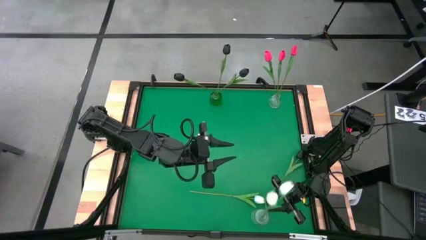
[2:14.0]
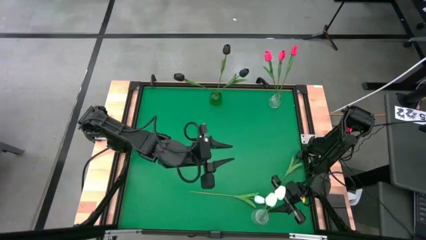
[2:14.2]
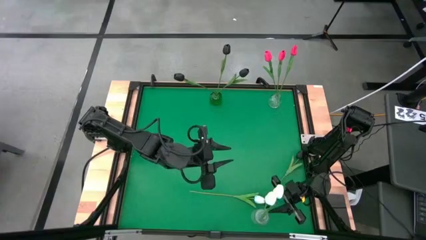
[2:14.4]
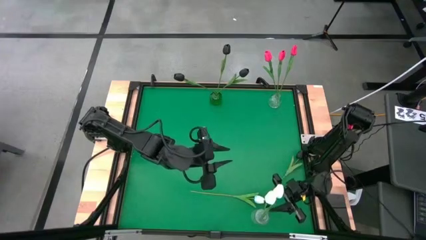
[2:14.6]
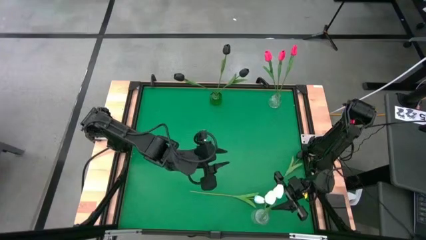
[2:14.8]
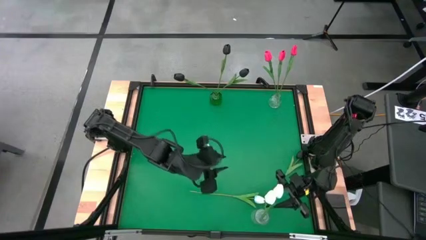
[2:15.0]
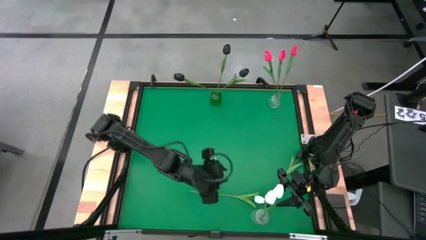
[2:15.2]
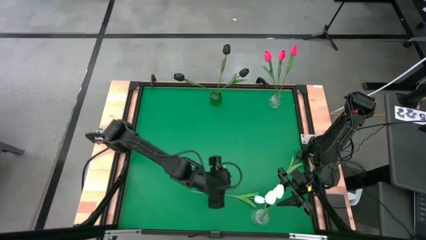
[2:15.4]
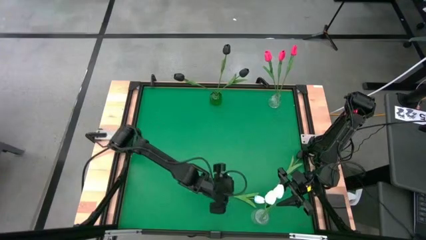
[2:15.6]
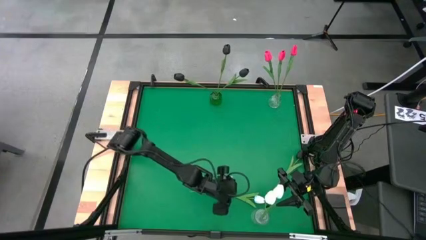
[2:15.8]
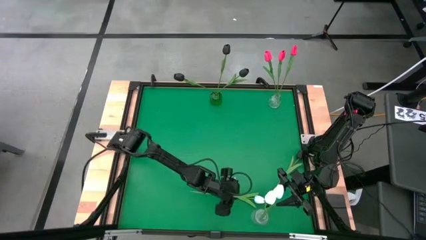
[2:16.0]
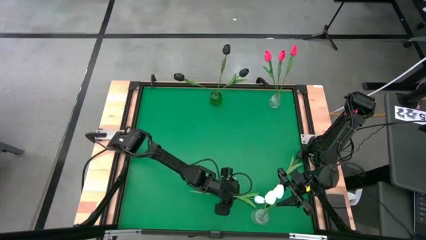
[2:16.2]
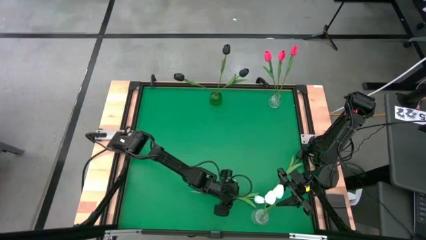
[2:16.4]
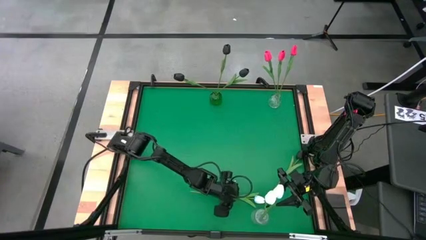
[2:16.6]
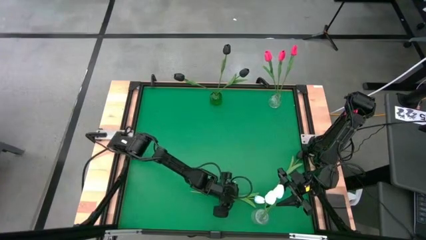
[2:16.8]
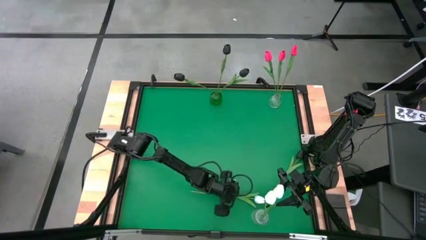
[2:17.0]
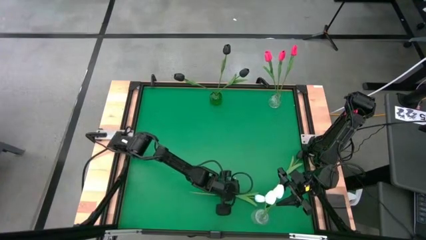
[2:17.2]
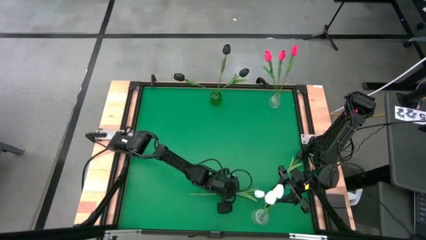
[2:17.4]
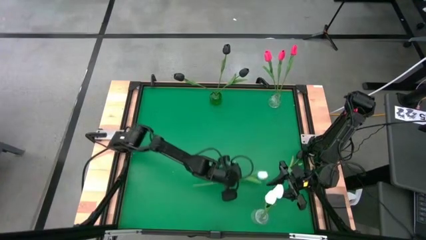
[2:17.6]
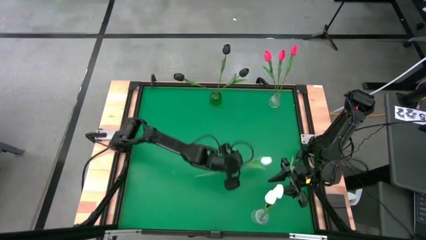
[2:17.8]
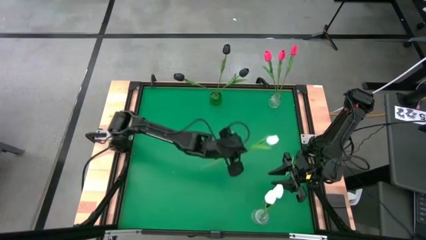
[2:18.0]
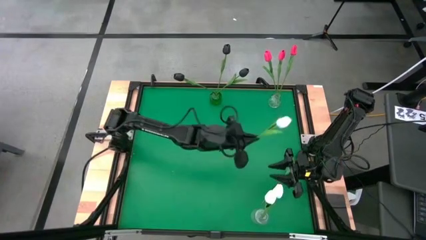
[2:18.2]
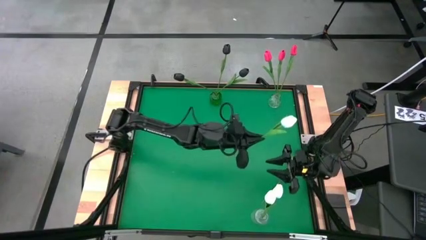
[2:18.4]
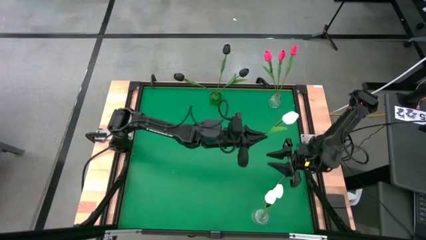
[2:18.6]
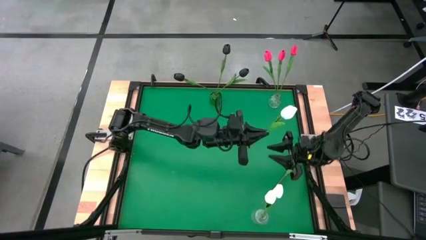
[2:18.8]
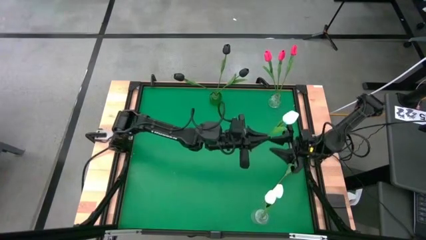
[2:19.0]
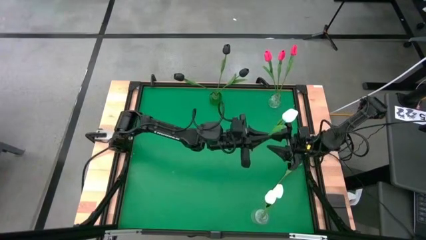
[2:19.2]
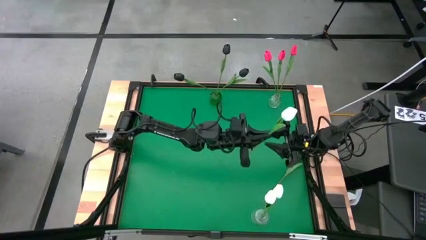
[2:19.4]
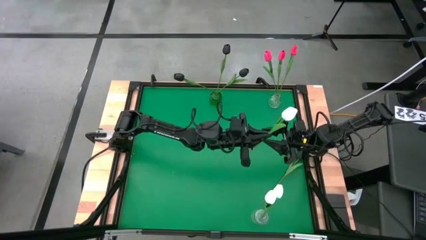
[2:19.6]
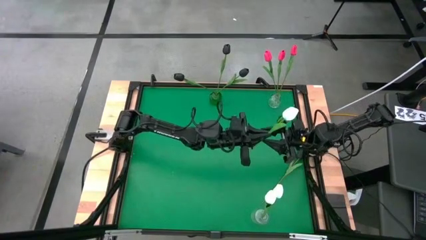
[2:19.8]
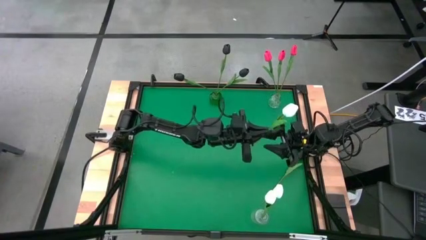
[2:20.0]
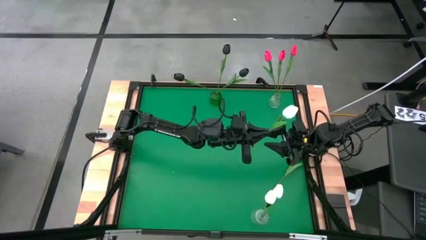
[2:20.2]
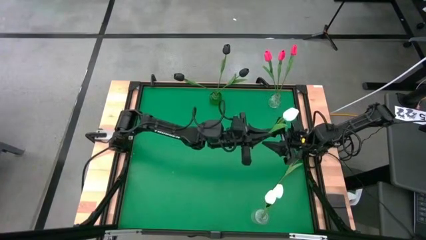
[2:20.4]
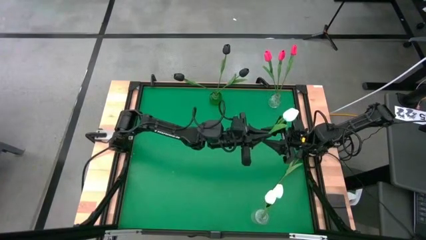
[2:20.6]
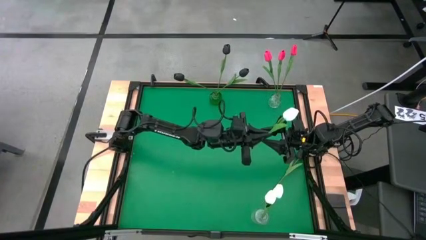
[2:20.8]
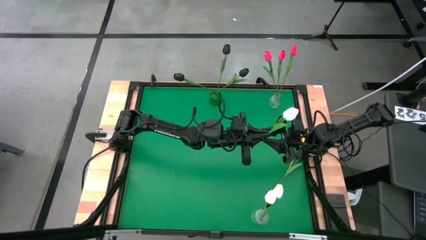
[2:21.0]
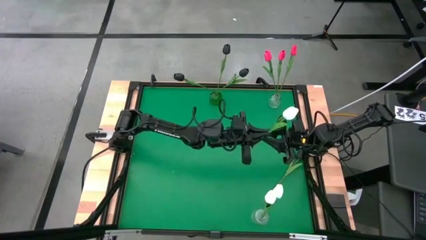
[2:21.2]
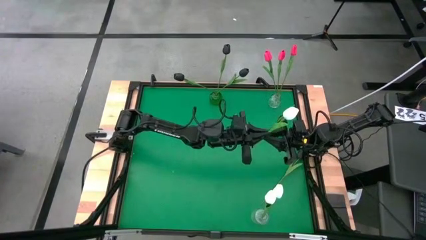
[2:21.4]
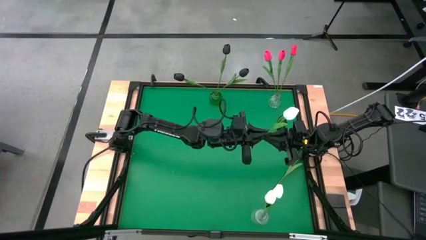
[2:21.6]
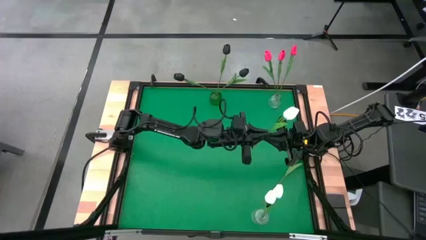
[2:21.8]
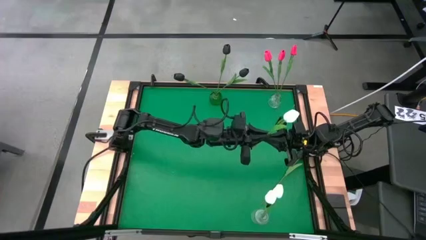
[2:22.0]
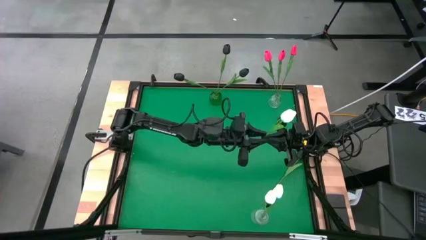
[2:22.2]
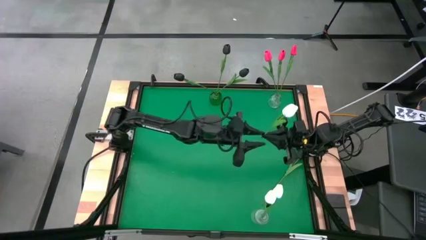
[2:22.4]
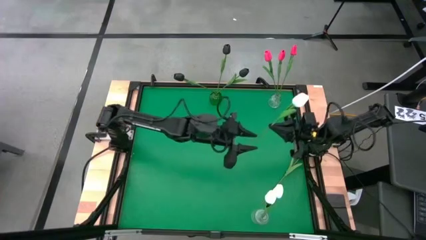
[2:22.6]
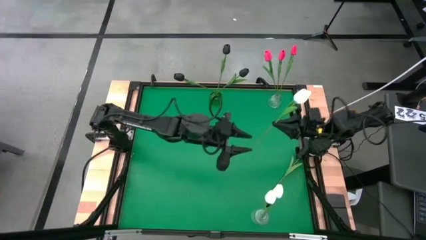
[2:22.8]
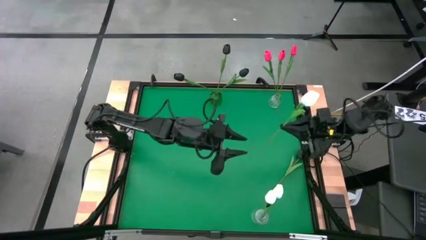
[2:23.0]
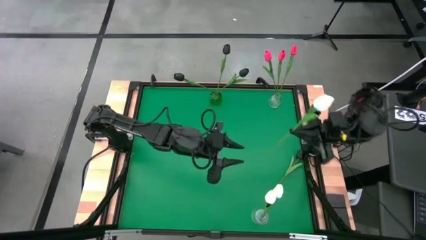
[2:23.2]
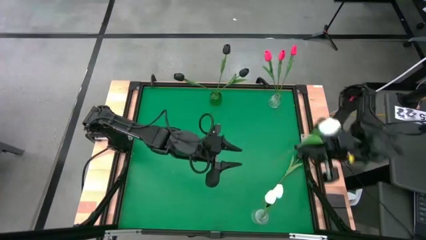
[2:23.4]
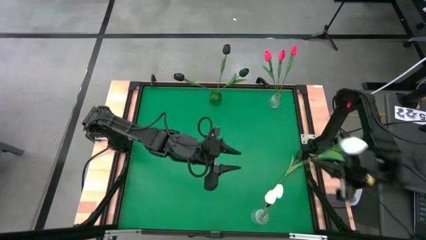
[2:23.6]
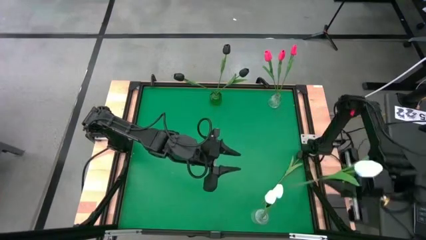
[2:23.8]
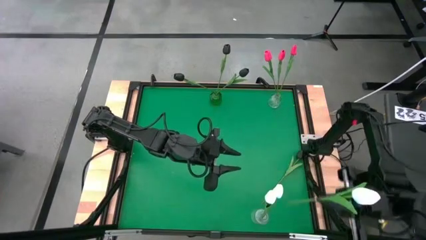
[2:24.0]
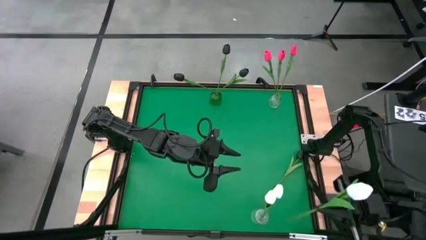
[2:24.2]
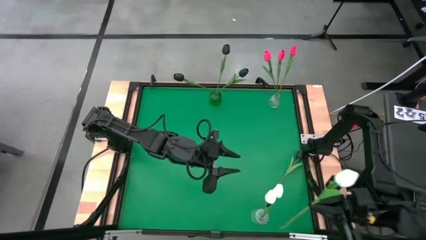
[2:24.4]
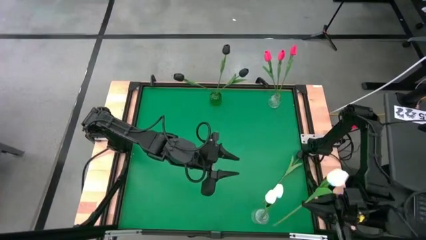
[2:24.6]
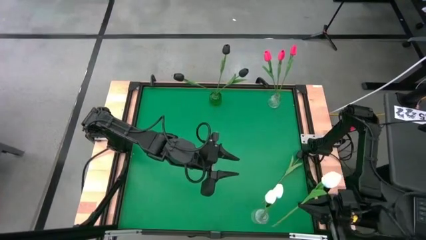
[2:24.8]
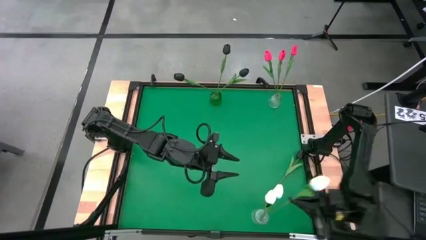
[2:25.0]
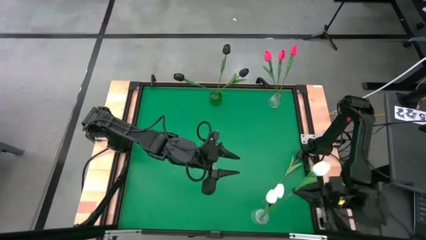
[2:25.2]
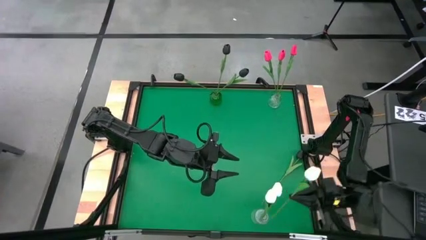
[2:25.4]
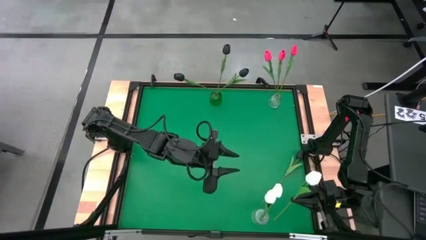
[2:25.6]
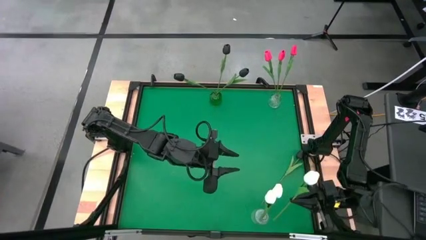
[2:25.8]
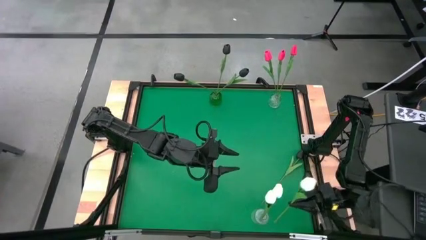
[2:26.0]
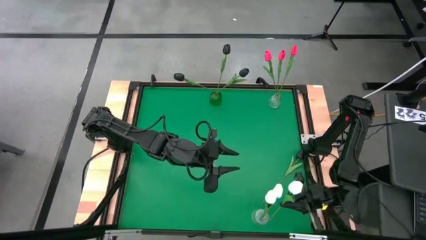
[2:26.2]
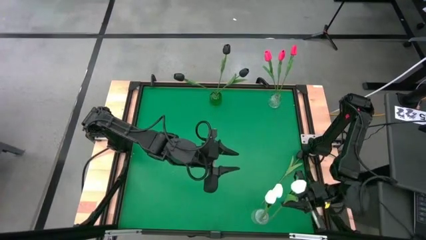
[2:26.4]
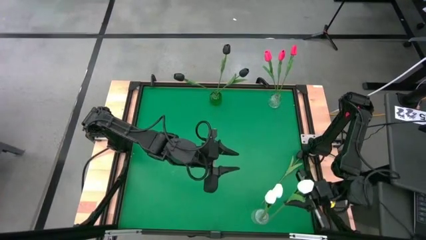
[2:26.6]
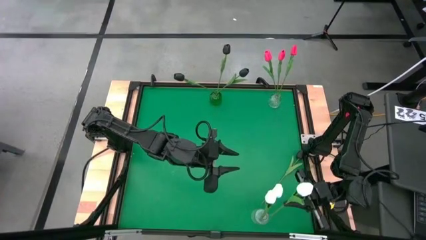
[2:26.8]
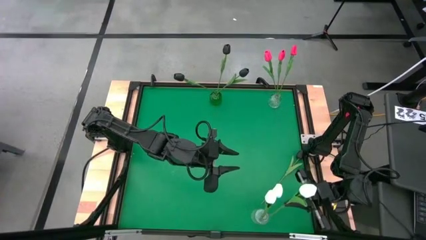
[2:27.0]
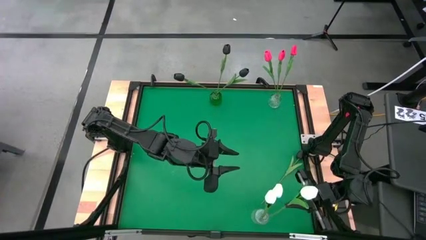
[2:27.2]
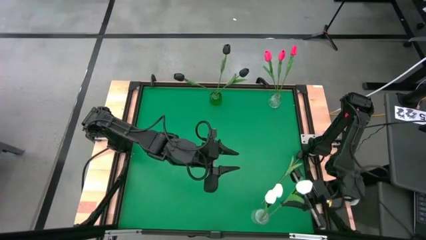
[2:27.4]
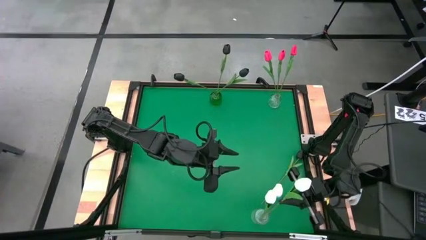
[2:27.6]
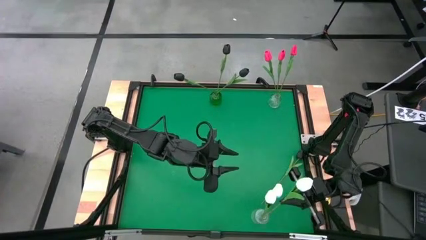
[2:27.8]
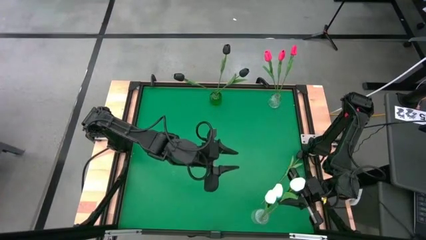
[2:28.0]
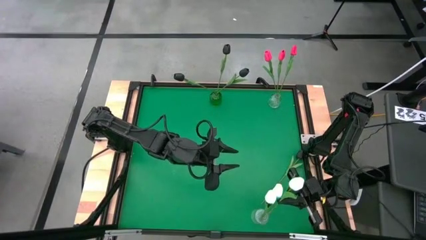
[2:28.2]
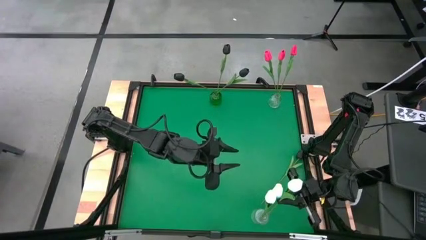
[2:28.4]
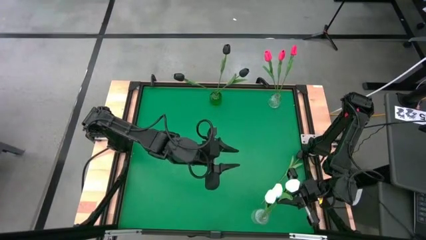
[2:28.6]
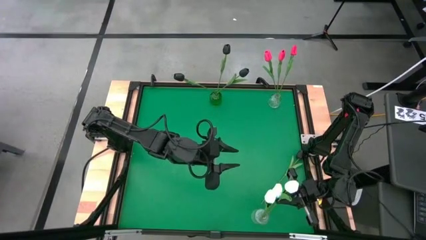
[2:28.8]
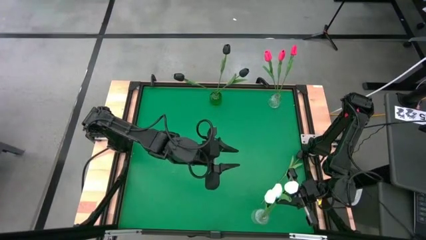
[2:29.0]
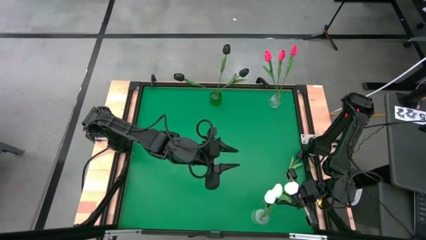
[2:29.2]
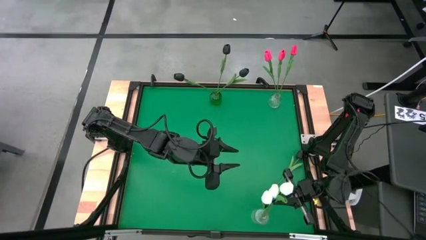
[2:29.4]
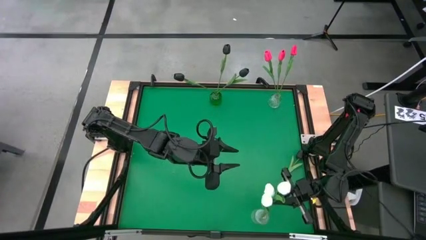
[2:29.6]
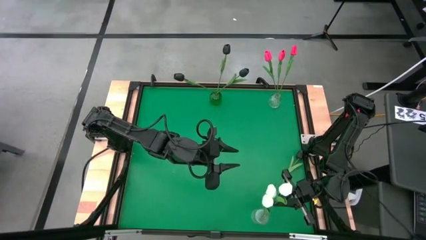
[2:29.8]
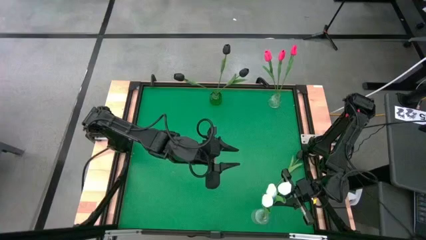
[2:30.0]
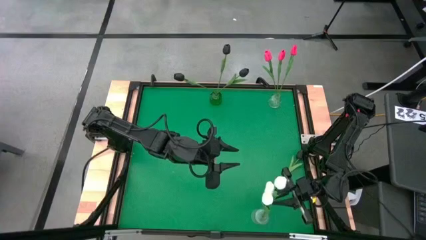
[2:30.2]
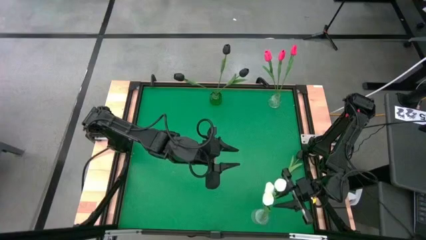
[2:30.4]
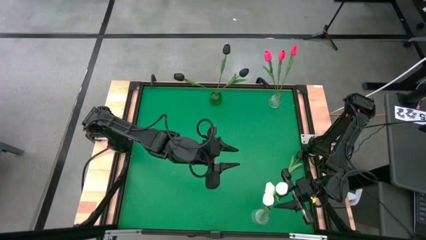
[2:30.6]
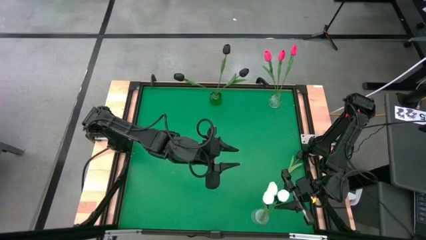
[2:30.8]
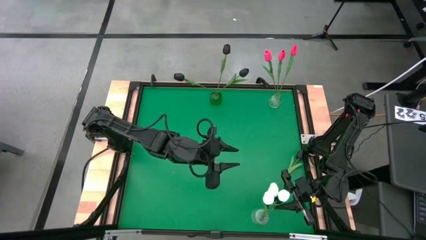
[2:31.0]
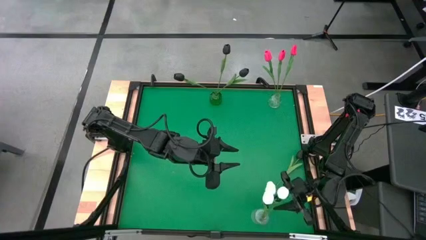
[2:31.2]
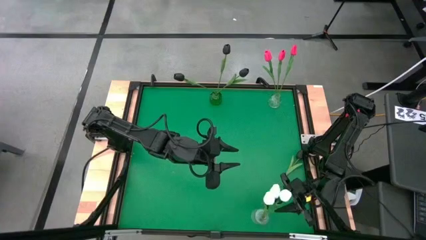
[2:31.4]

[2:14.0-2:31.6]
Task: Sort flowers into vase by color
Put the white tulip into the bottom transparent vase
